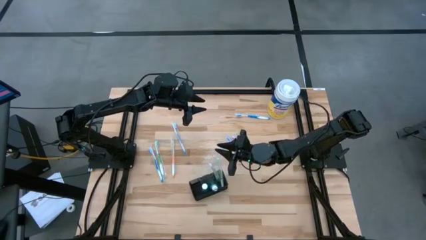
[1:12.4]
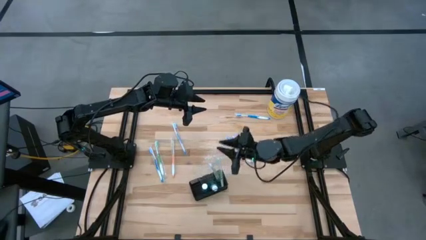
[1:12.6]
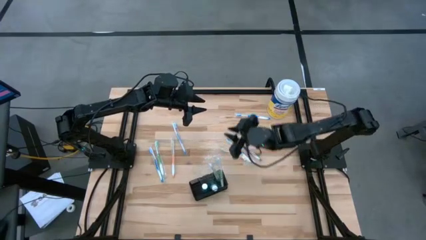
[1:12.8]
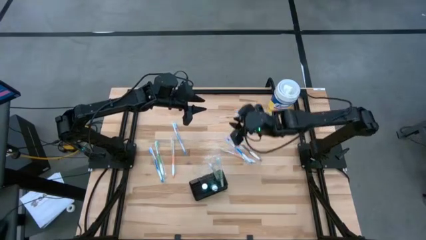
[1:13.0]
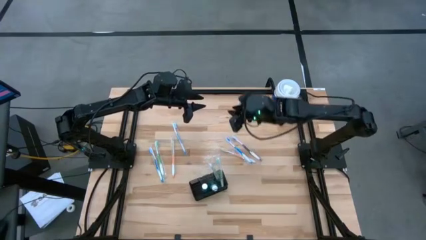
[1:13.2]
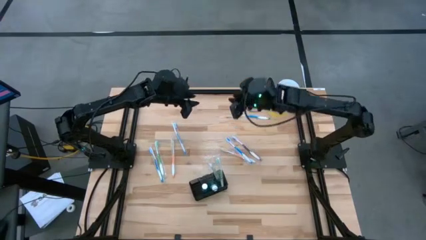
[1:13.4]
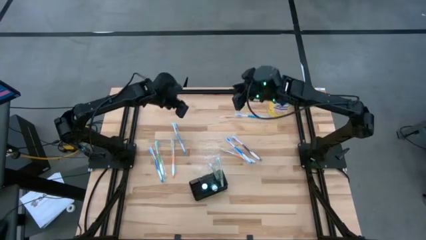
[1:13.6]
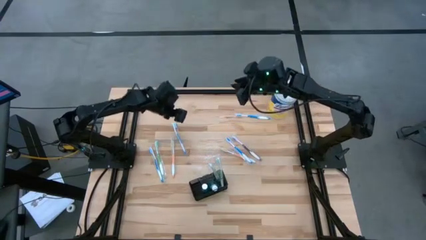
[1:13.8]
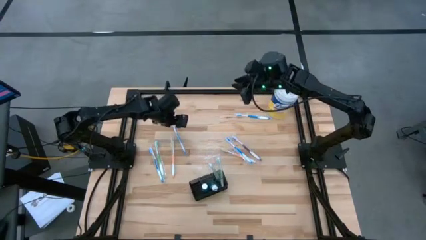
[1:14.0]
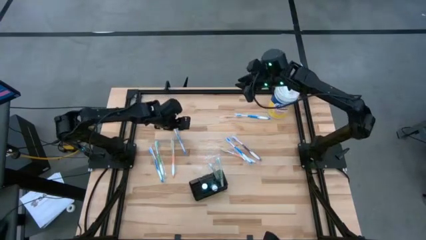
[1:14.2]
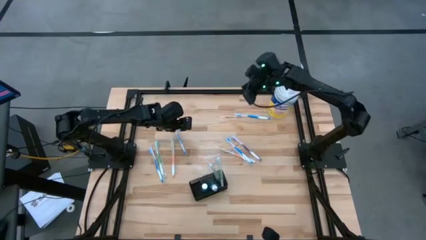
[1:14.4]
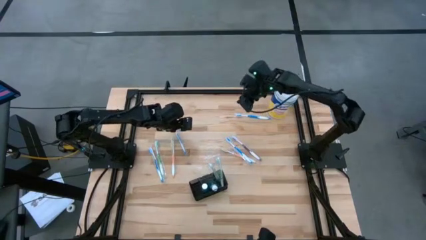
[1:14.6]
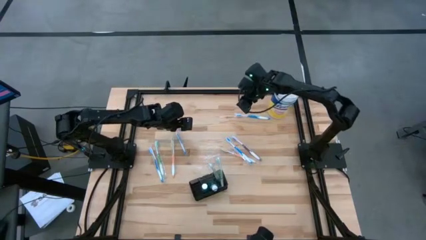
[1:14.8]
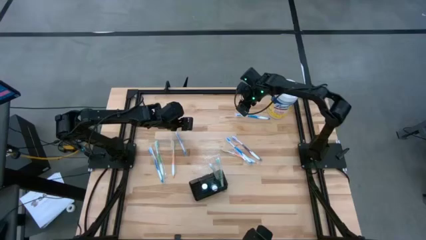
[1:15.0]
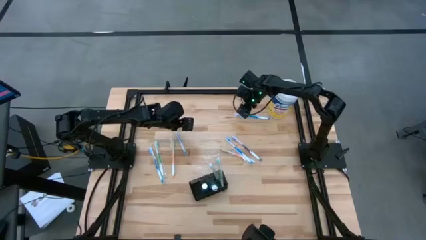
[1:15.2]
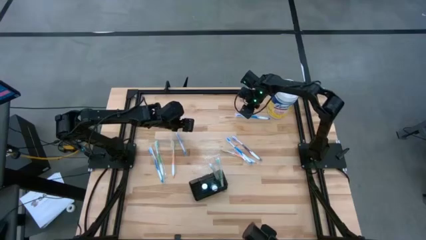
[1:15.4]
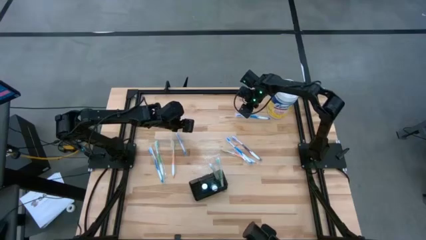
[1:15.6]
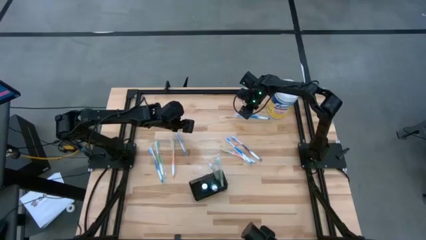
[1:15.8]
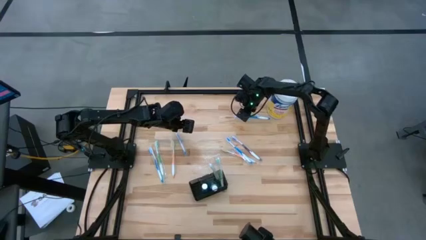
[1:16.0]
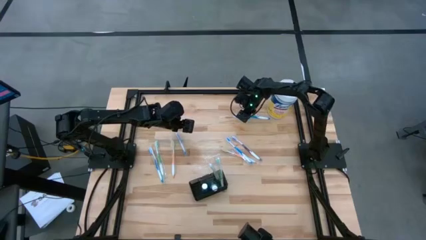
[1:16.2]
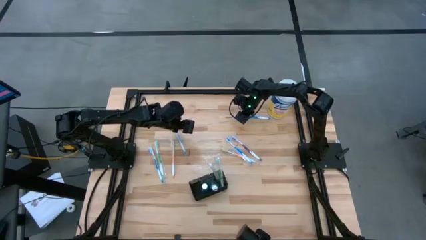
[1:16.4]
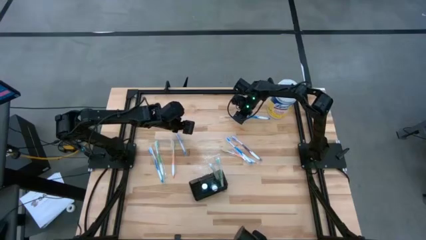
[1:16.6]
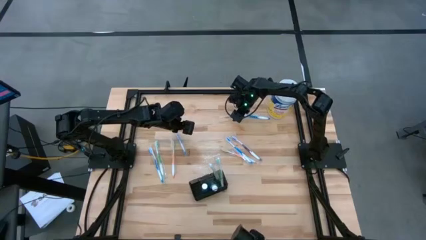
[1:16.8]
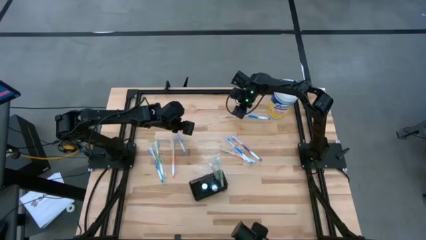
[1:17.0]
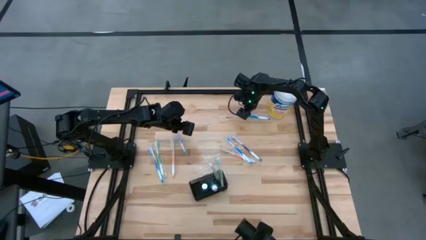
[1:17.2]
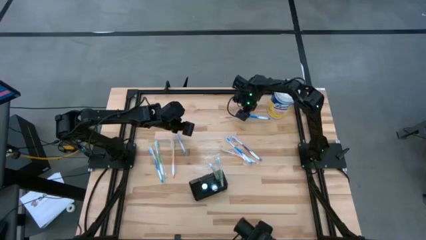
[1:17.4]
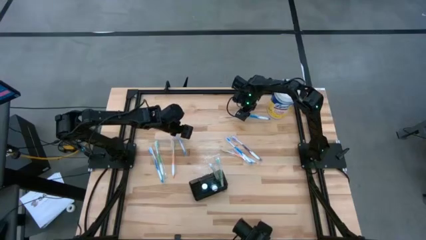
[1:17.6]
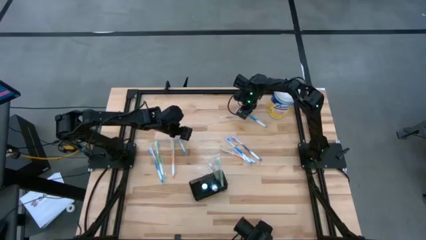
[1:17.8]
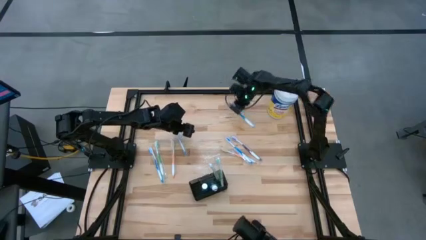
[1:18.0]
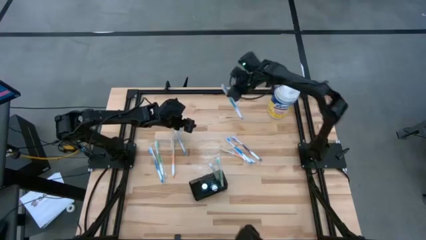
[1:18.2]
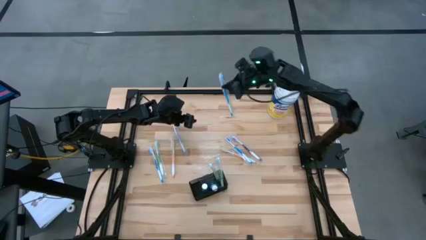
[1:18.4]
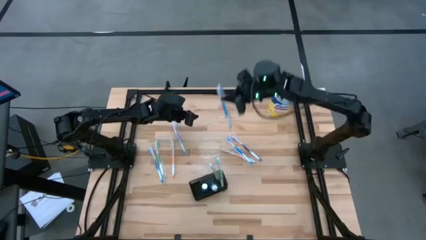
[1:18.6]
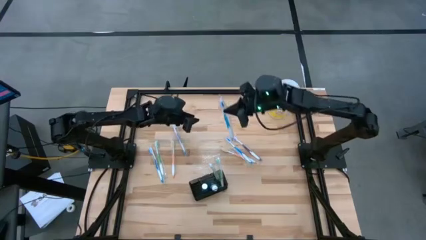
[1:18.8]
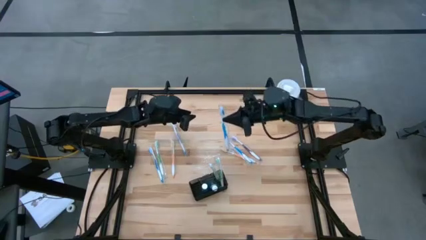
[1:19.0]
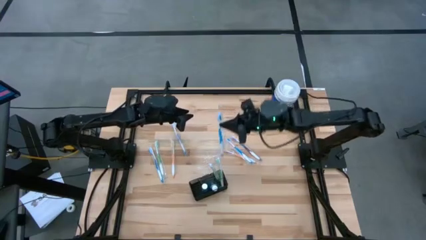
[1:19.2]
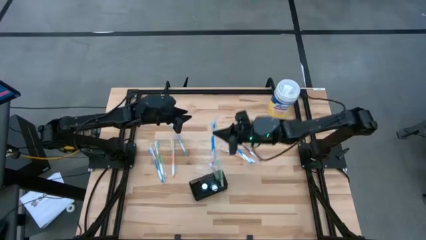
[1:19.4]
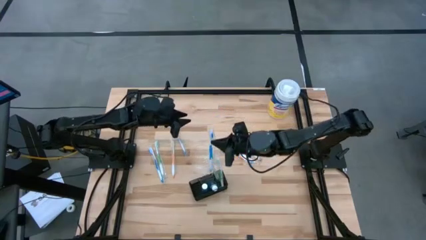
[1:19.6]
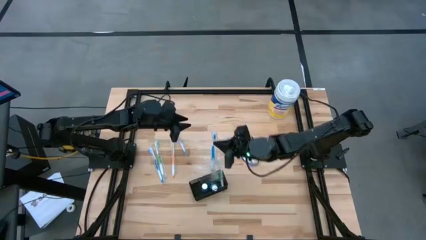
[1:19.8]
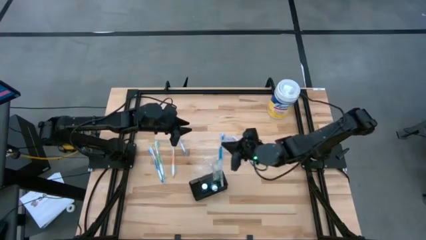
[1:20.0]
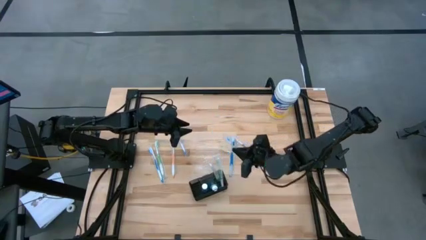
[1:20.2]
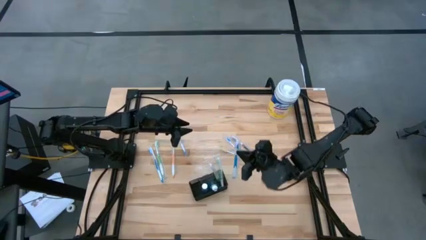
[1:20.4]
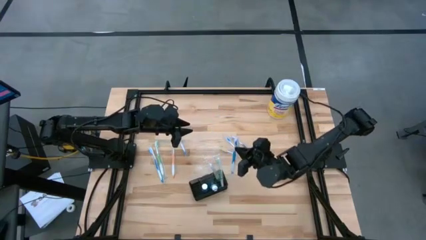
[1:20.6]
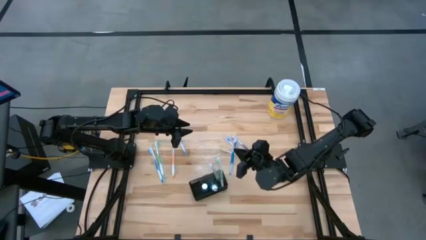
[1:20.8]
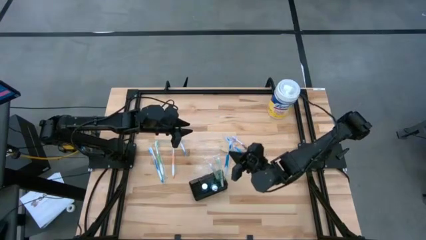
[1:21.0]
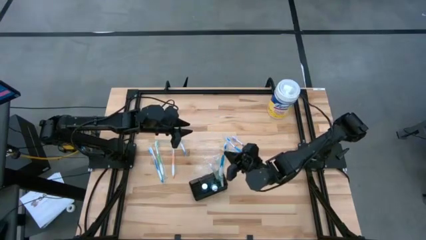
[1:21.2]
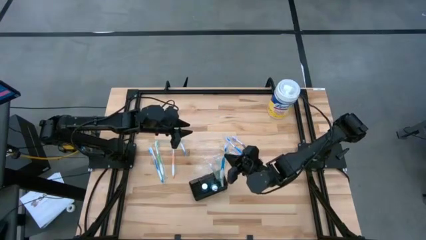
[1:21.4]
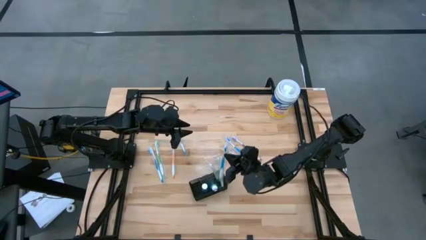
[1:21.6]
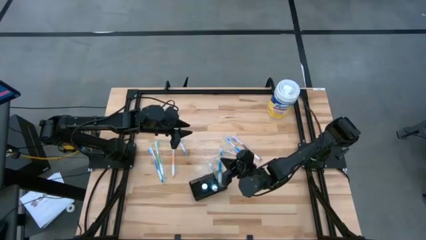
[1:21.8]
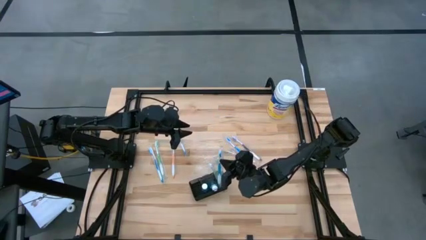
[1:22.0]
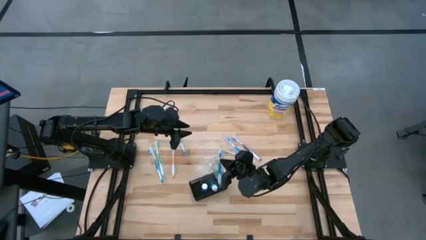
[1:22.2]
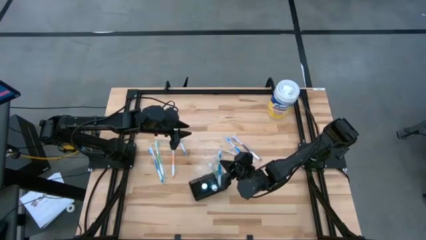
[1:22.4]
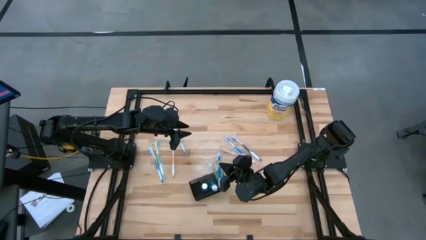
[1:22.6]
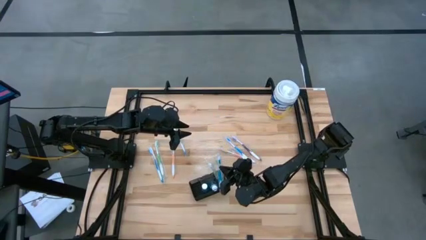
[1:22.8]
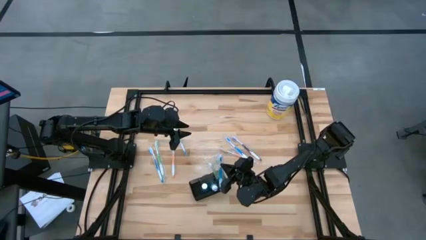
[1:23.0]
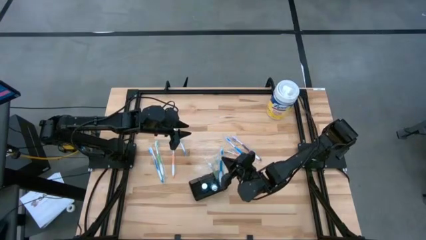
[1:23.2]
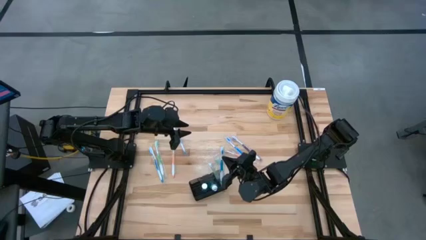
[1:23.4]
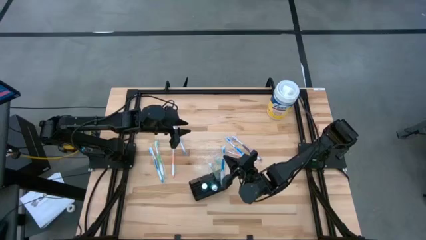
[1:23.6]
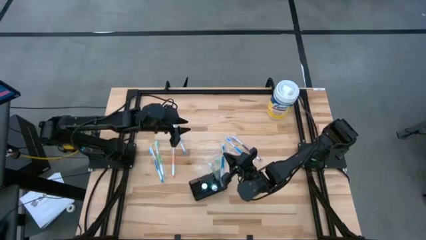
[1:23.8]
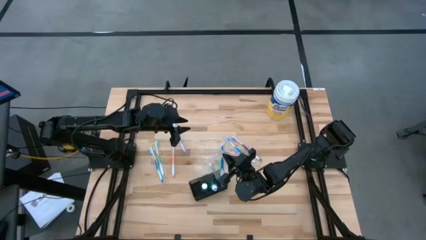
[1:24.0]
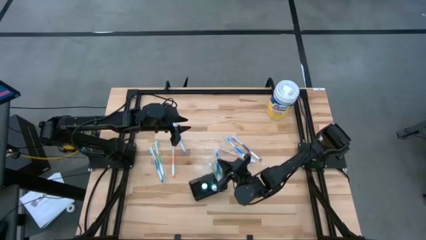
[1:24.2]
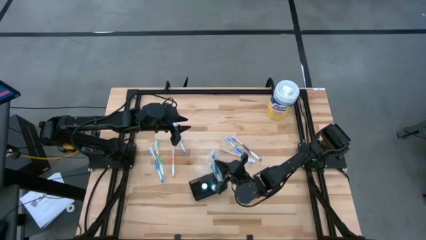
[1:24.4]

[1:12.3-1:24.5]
Task: Pick & Place toothbrushing station
Put the blue toothbrush into the mesh organizer

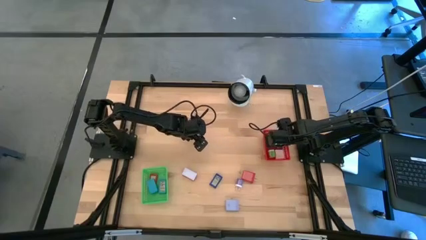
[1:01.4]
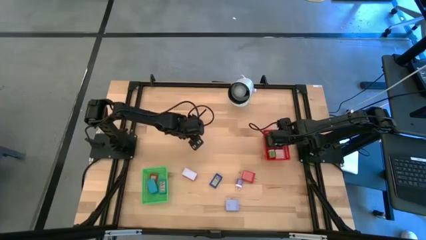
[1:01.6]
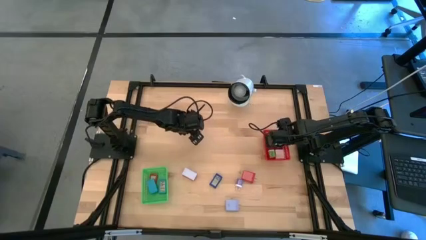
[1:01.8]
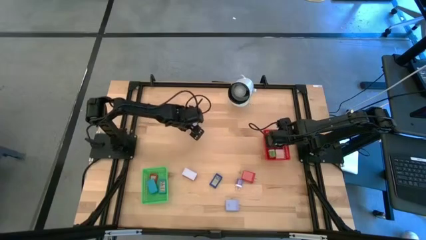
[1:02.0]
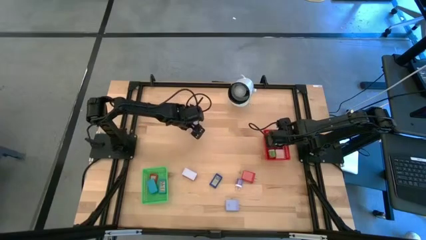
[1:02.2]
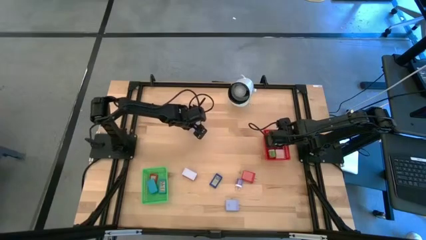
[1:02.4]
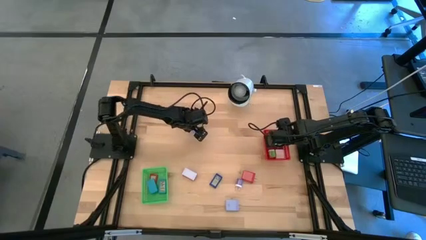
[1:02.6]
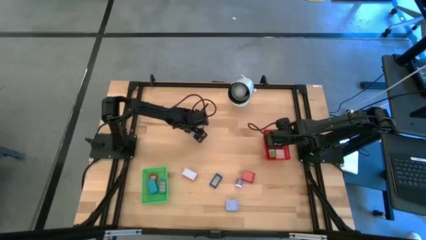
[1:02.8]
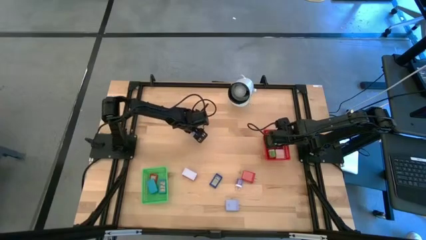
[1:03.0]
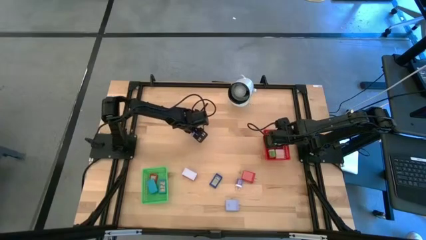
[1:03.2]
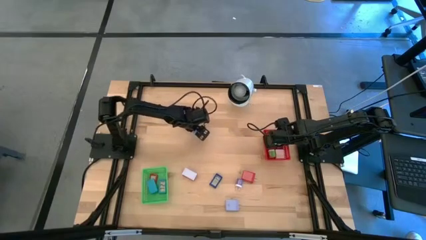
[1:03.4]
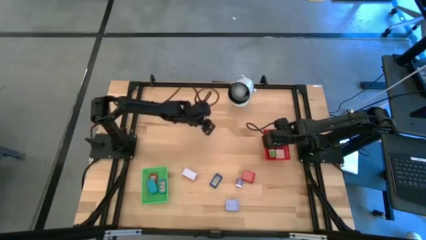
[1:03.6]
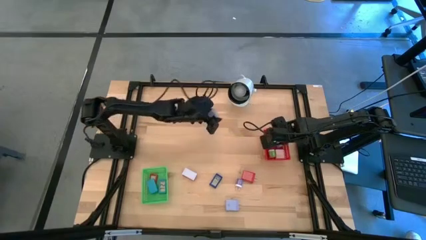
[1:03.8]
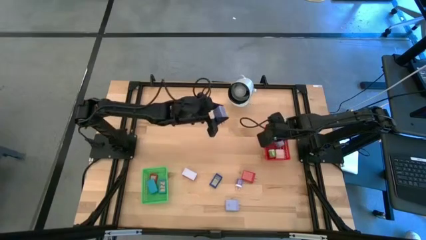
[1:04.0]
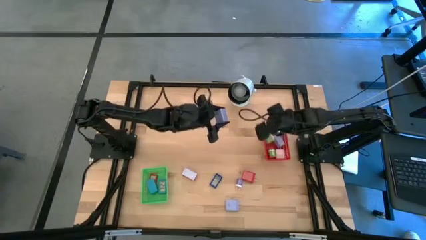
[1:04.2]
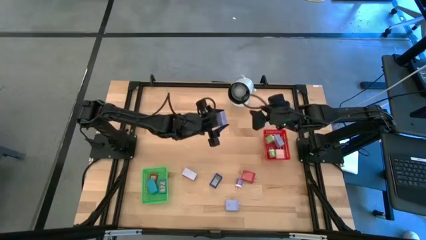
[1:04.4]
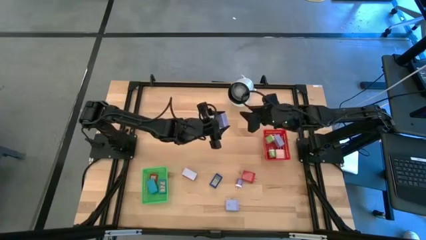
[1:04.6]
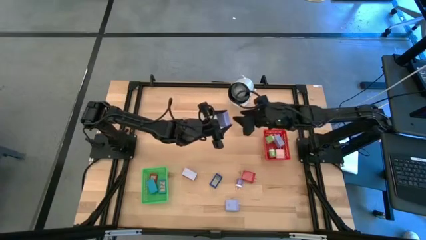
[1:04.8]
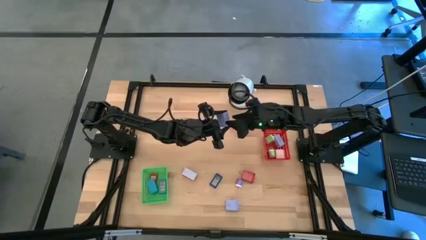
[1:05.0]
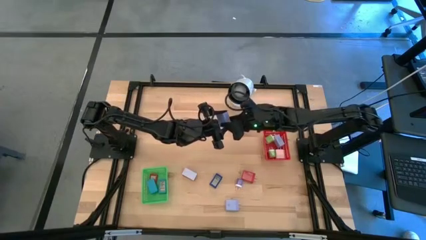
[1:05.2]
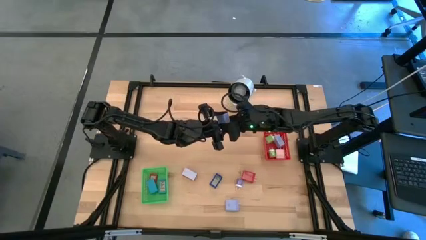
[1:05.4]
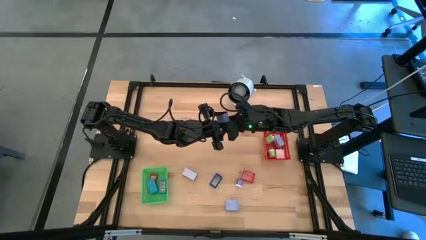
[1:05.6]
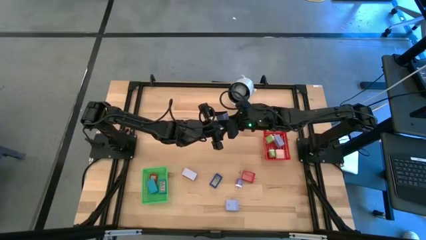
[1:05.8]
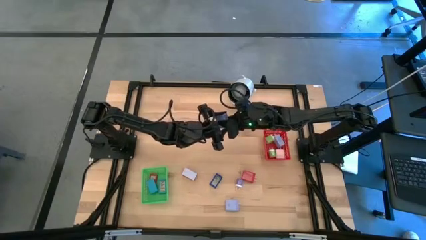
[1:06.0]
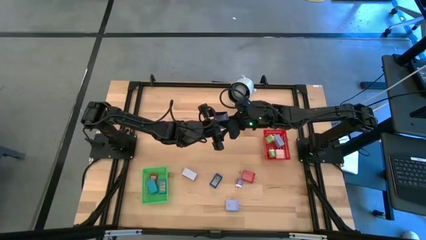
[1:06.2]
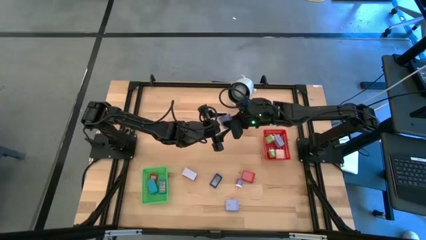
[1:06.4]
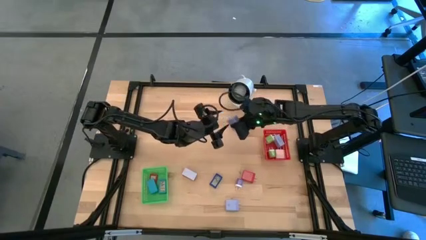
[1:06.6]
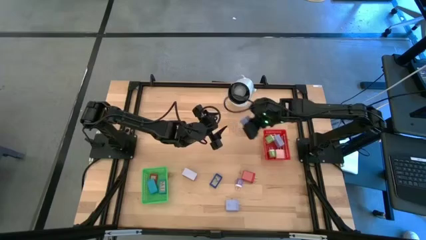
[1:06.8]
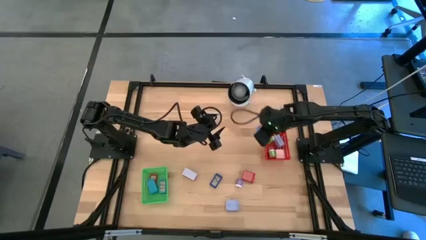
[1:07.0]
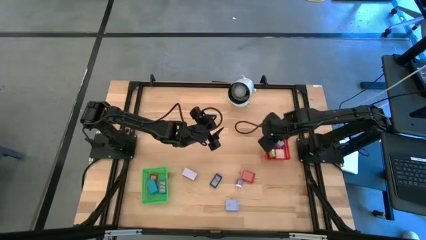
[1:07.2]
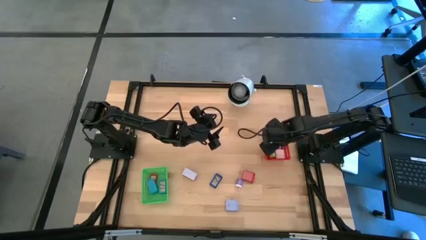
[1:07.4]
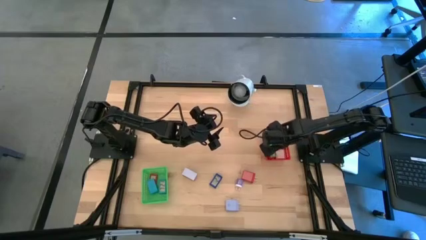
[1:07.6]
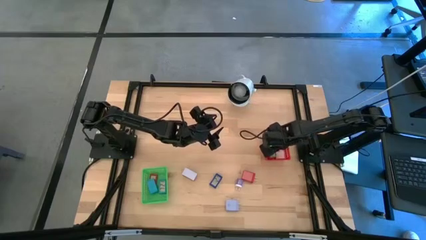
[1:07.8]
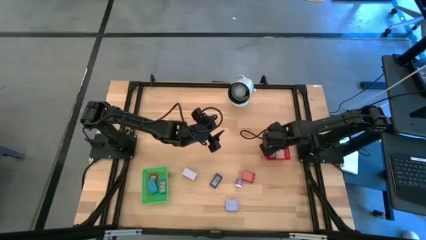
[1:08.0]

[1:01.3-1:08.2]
Task: Pick & Place Office items
Put the top light blue charger adapter into the red bin
